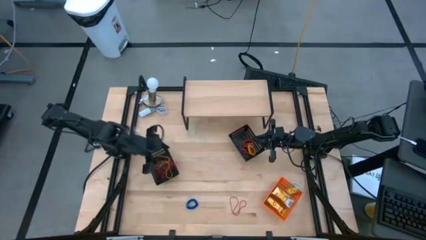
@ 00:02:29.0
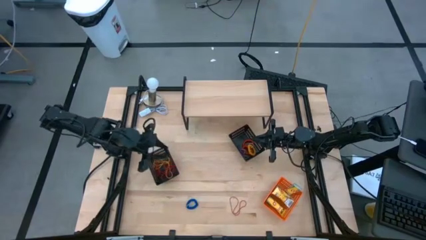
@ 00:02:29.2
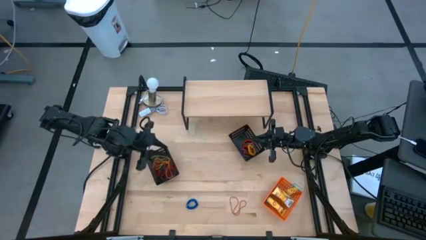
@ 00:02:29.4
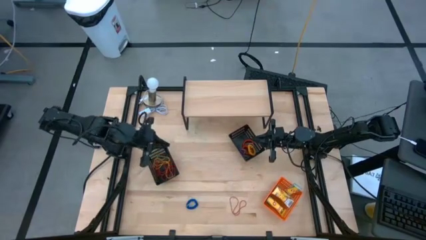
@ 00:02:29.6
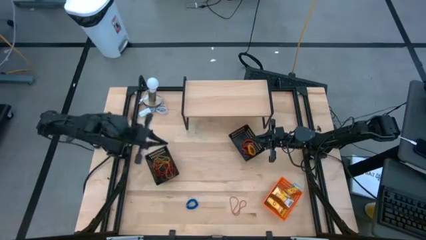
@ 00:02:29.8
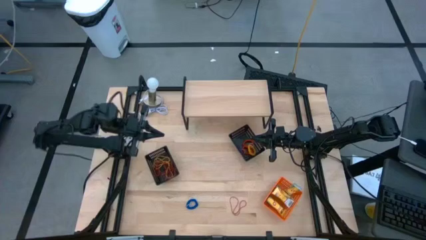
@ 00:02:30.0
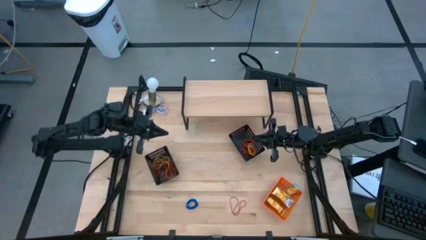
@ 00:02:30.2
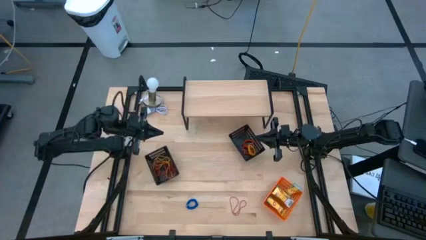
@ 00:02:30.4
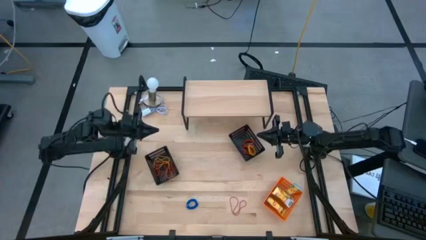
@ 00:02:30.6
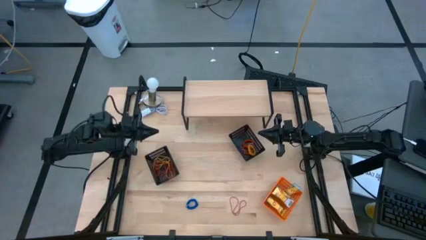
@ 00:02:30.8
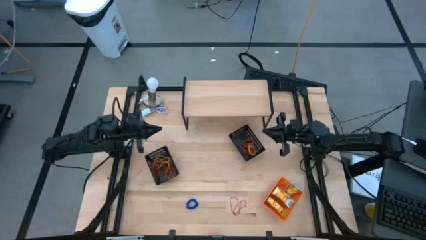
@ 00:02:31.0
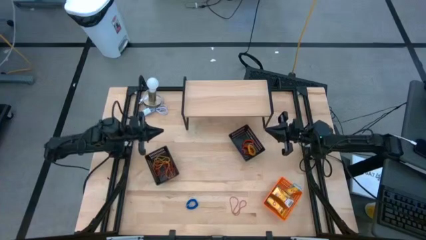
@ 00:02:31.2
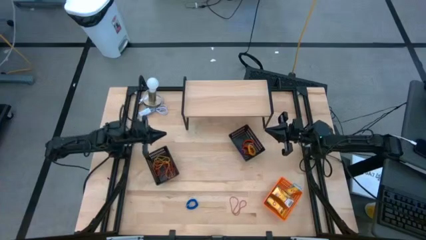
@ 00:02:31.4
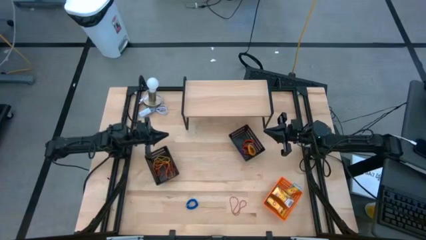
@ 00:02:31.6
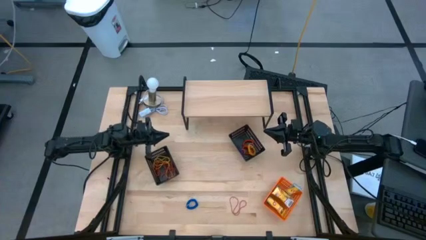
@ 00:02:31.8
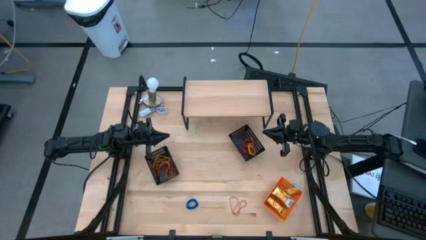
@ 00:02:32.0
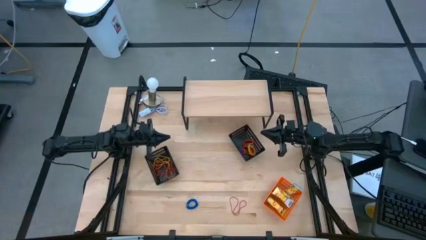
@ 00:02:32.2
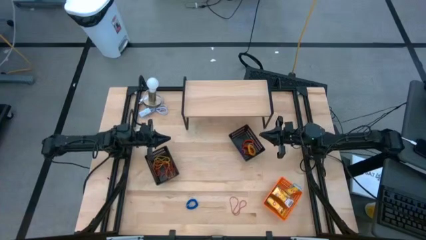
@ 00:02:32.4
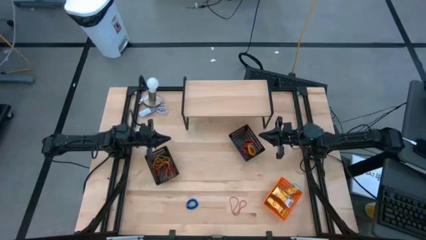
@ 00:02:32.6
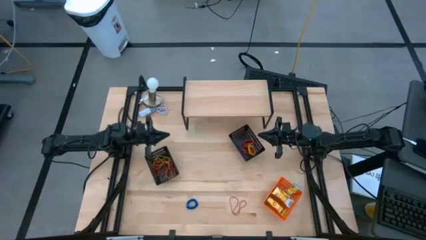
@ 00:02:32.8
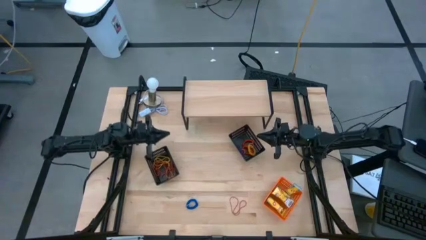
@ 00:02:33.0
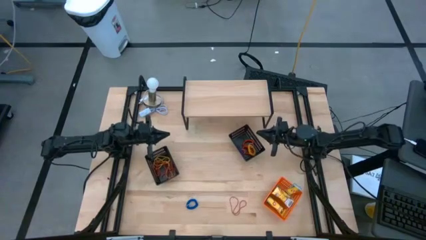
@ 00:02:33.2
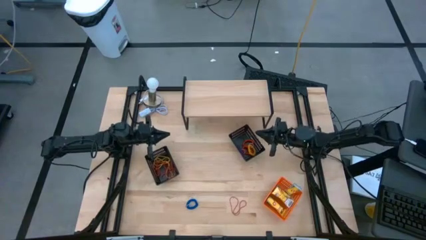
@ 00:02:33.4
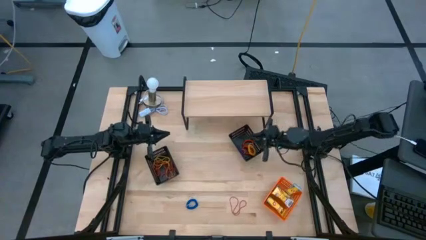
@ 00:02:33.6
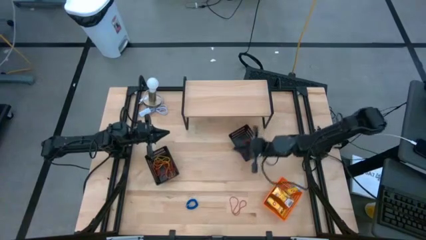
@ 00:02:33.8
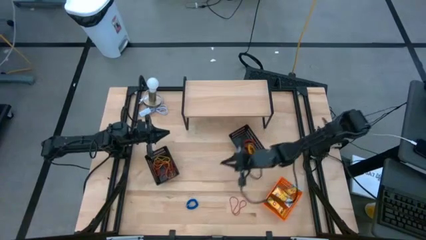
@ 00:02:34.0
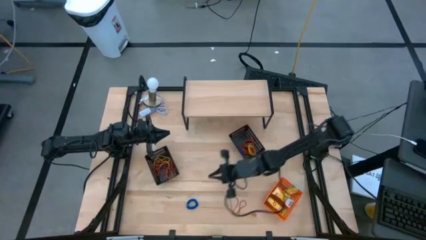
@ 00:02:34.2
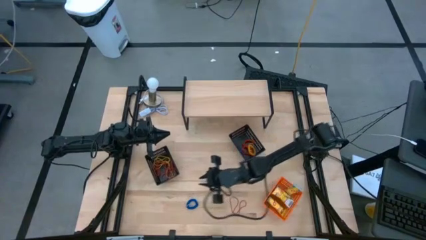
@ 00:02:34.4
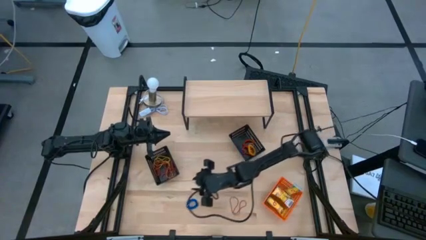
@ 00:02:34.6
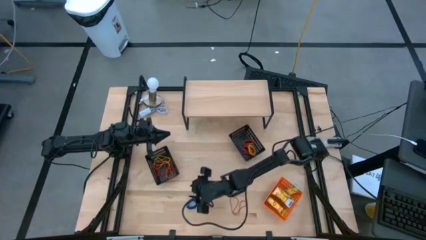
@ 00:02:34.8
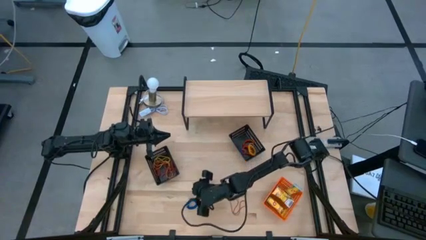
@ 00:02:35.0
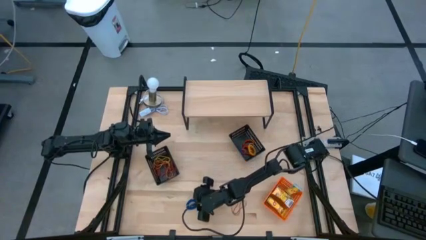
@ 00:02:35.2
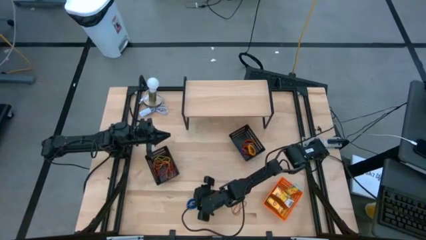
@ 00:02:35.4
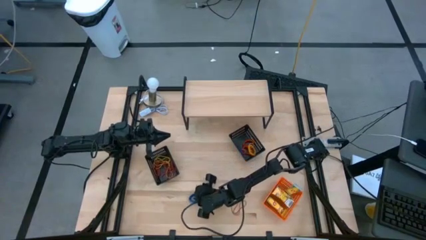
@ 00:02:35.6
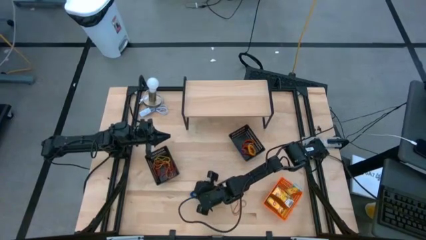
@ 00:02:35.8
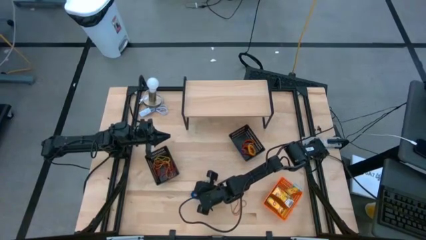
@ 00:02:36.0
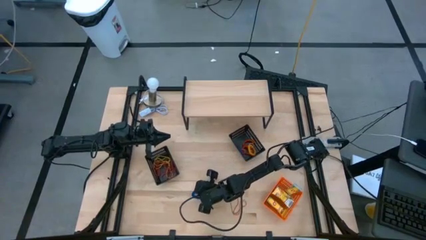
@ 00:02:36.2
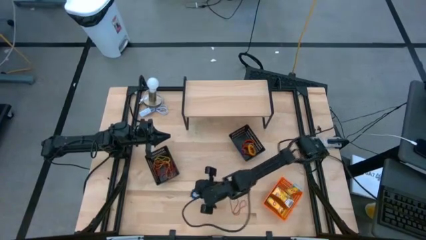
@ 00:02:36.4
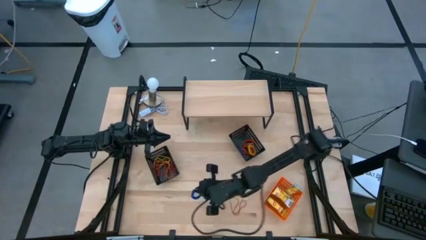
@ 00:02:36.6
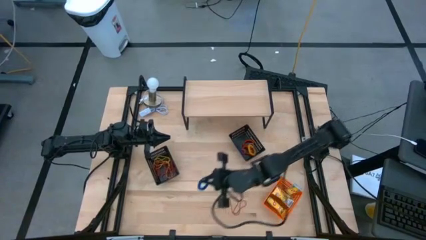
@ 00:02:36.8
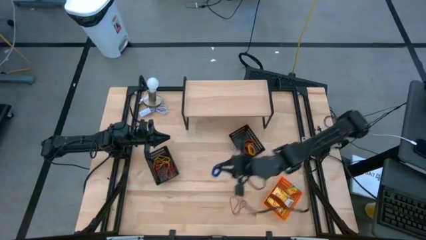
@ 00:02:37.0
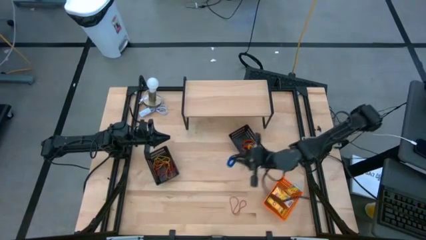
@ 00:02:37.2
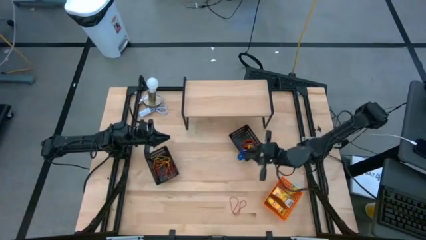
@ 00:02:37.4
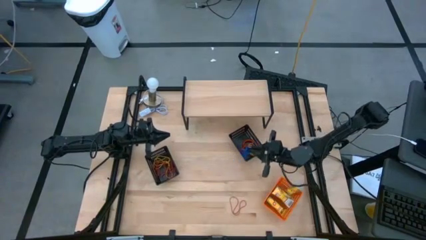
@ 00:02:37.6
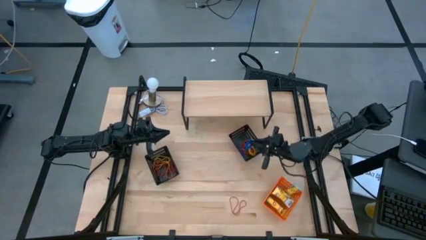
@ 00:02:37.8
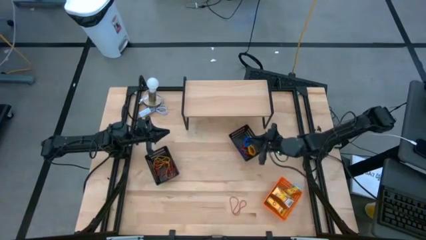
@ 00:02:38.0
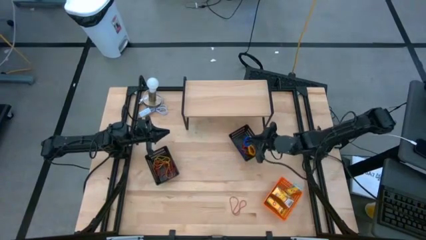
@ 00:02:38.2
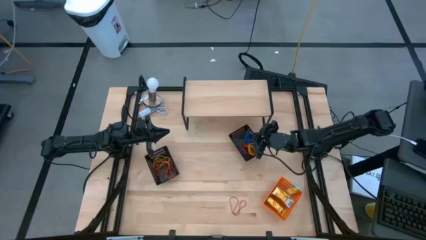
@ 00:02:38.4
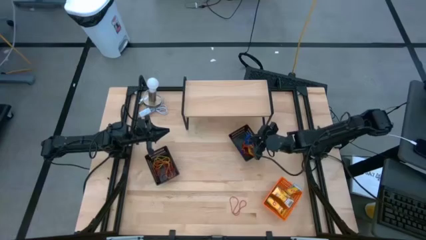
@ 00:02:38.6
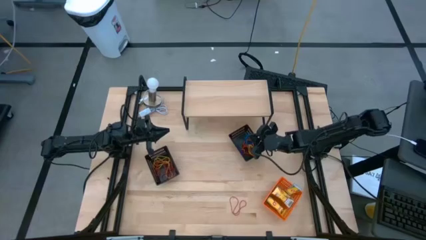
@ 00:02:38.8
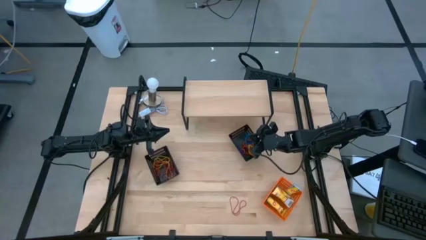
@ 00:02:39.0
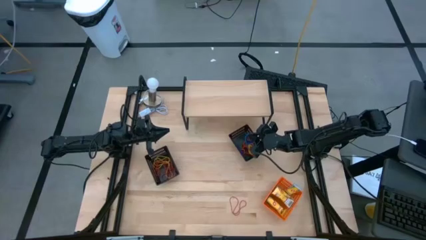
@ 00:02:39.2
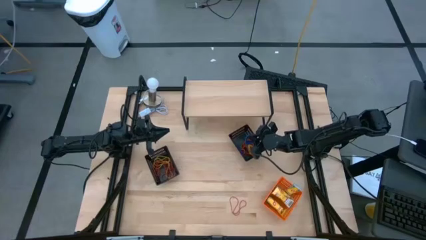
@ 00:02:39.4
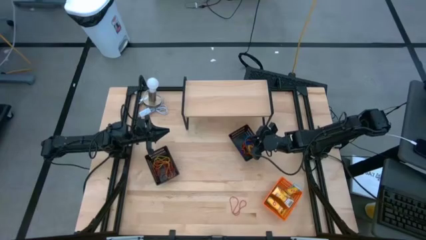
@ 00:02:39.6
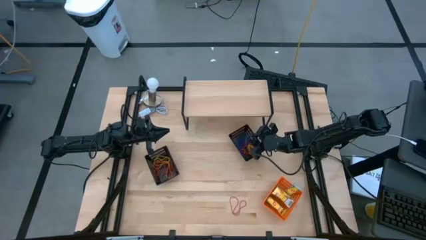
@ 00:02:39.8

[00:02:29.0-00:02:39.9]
Task: Pick & Place Office Desk Supplies
Put the blue spring keychain into the right black bin

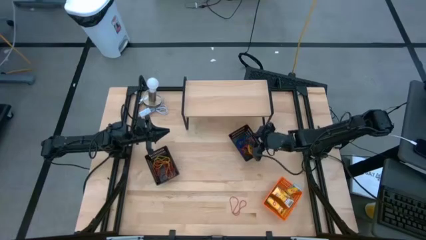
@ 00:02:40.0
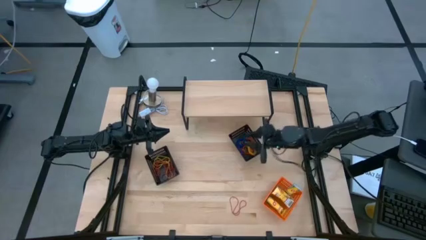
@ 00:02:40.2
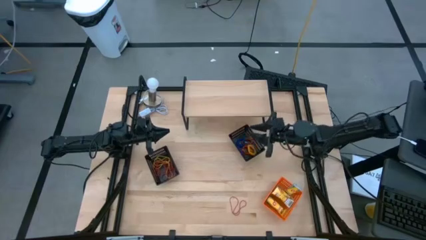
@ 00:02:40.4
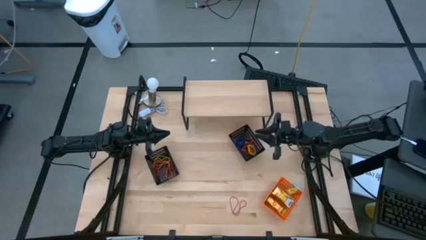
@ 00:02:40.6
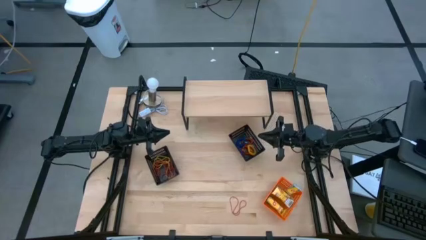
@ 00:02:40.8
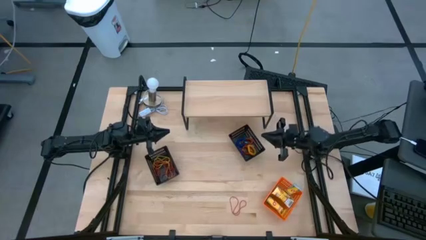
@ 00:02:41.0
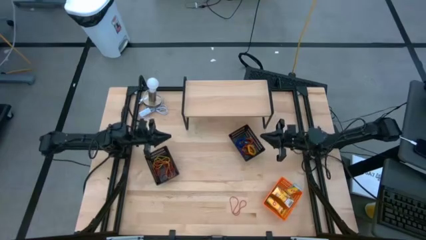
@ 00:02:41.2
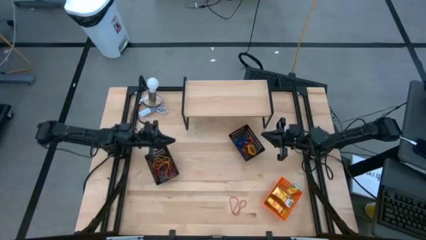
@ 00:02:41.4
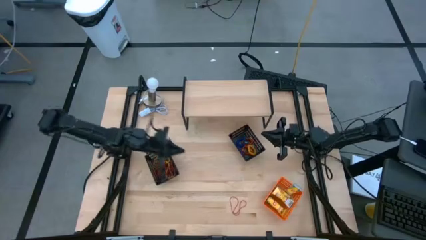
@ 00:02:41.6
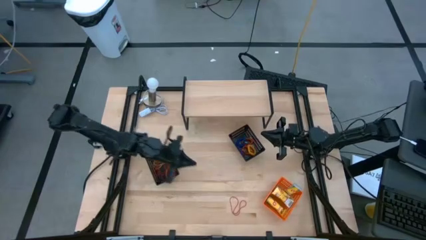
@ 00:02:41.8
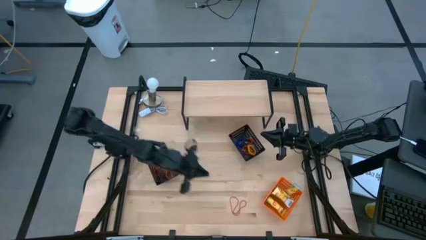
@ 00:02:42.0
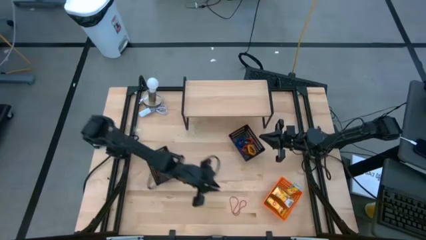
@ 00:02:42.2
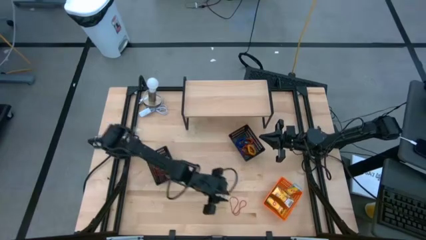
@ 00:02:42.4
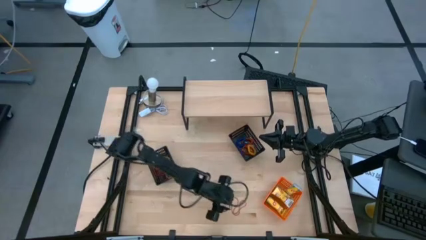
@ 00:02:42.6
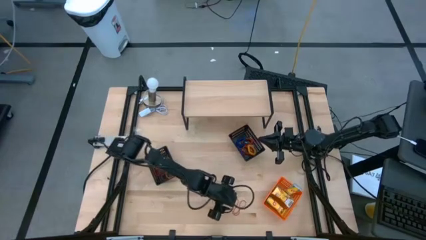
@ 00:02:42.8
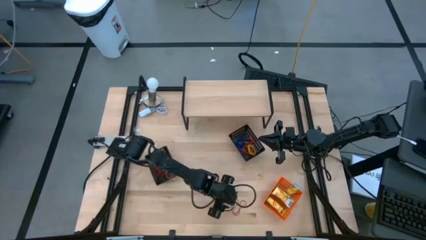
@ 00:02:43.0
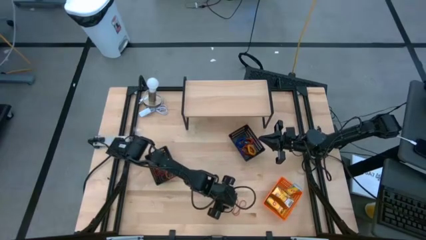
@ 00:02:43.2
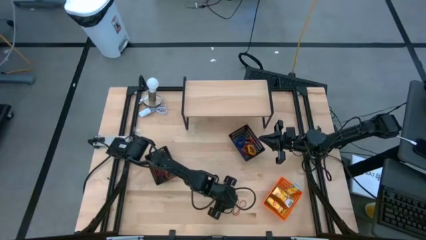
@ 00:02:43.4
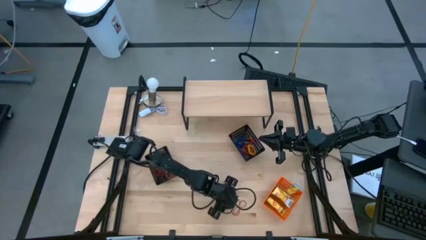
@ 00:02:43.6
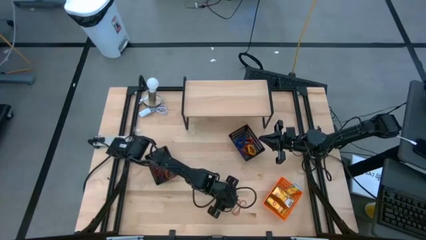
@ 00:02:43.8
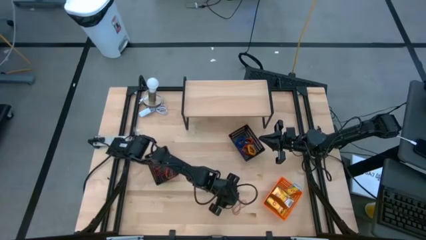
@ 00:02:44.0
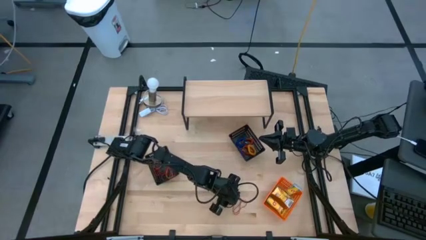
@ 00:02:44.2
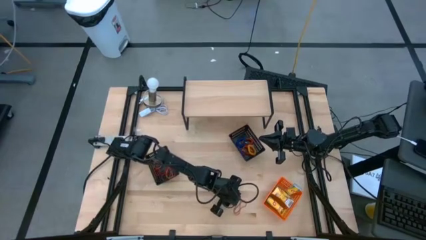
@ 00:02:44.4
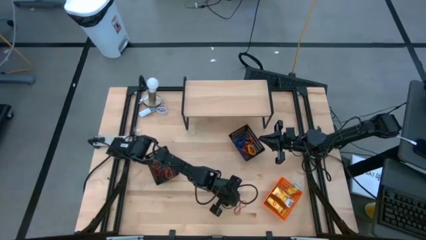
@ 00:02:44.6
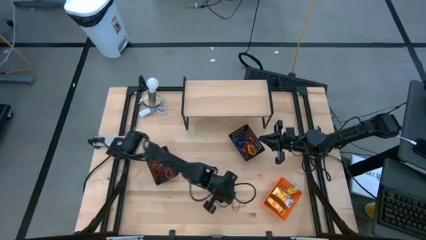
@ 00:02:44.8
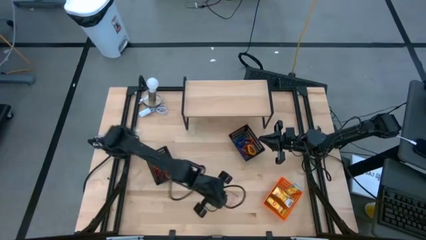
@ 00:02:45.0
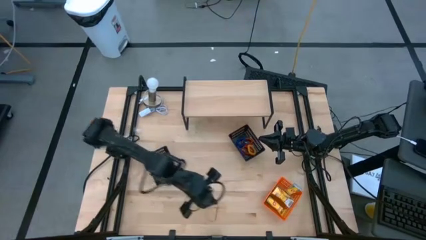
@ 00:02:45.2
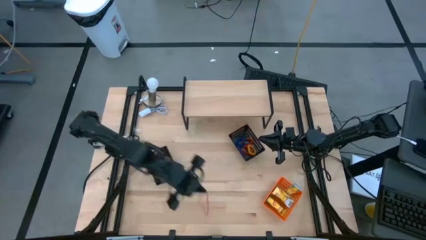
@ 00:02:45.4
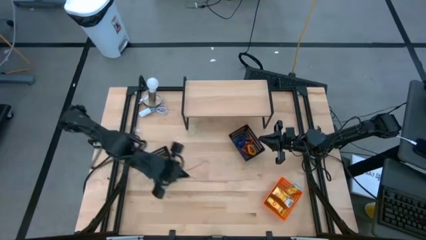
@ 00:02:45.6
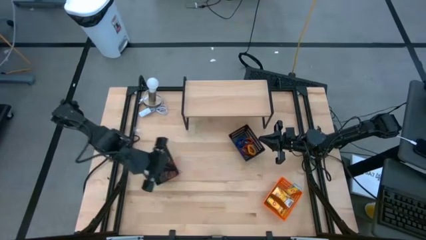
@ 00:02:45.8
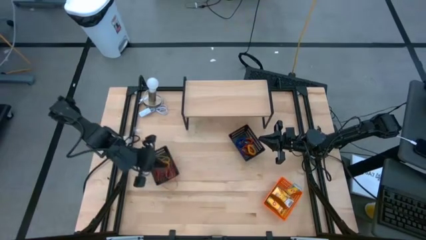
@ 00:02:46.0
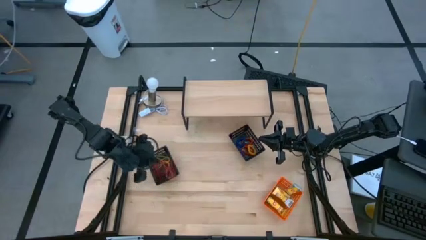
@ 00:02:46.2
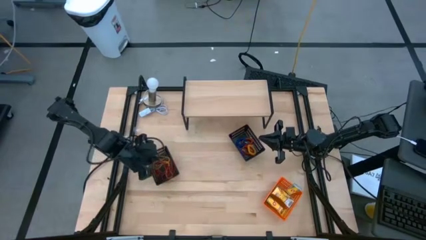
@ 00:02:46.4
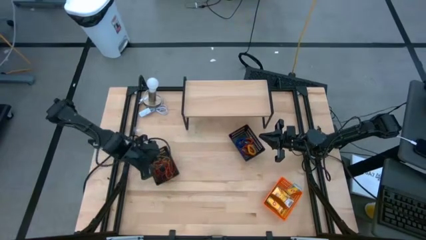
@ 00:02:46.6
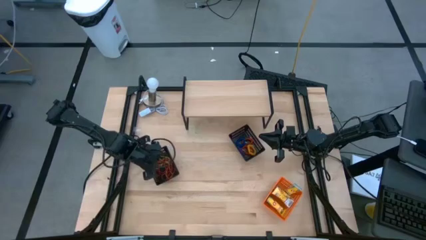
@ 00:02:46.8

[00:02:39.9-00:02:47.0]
Put the red rubber band into the left black bin
